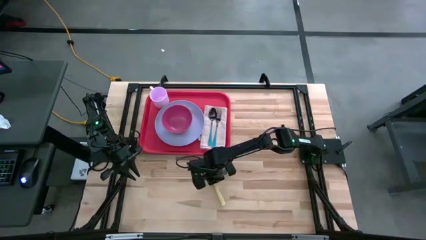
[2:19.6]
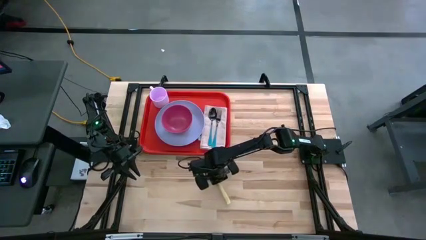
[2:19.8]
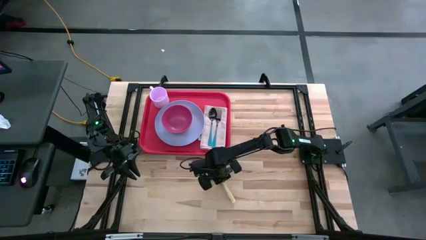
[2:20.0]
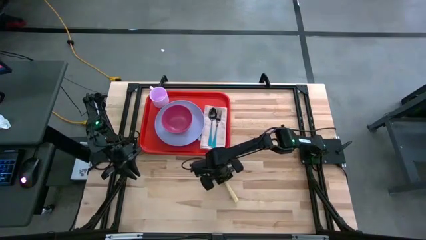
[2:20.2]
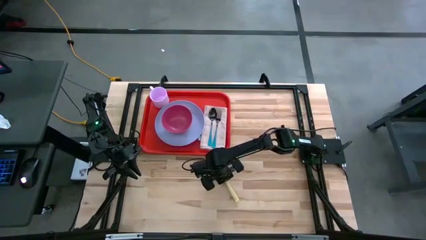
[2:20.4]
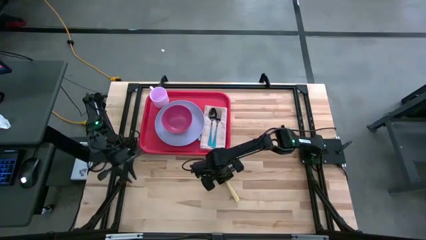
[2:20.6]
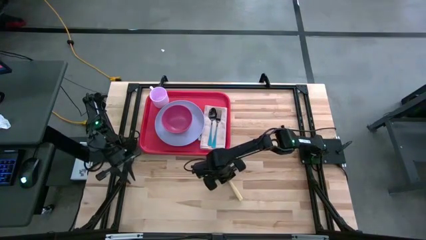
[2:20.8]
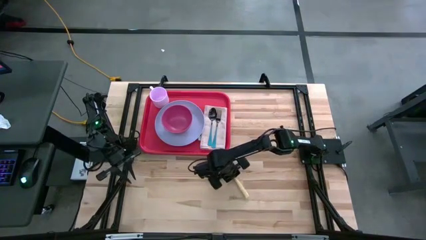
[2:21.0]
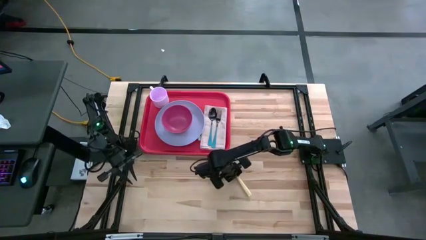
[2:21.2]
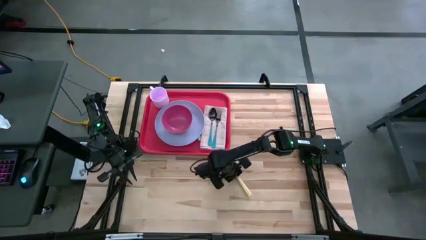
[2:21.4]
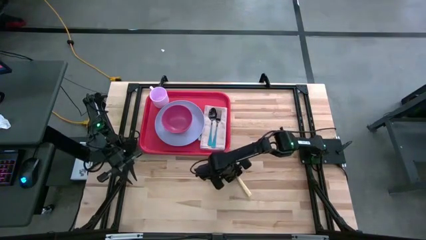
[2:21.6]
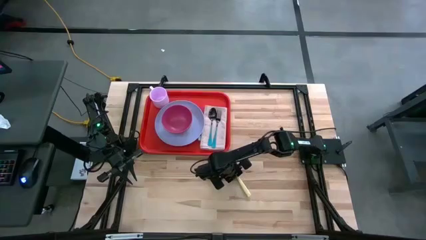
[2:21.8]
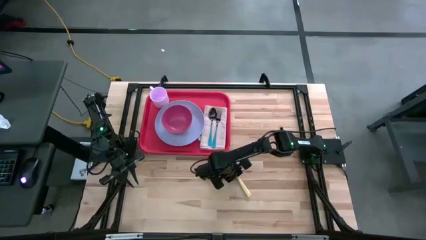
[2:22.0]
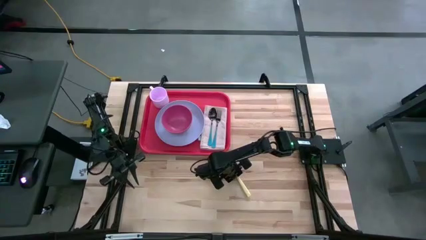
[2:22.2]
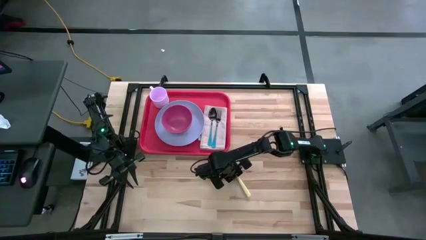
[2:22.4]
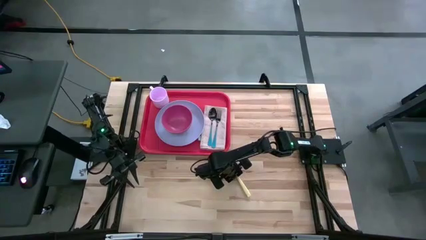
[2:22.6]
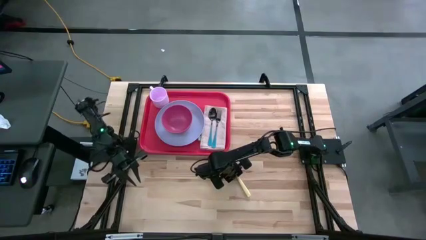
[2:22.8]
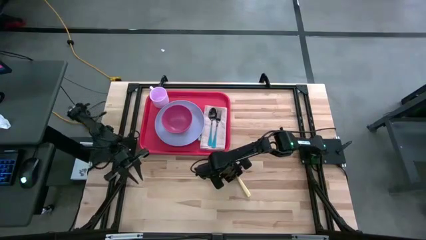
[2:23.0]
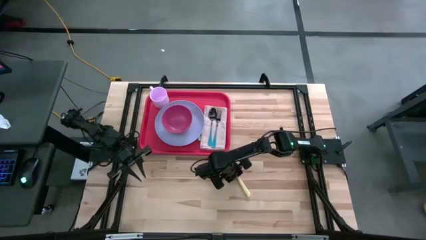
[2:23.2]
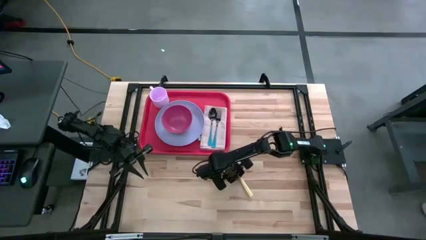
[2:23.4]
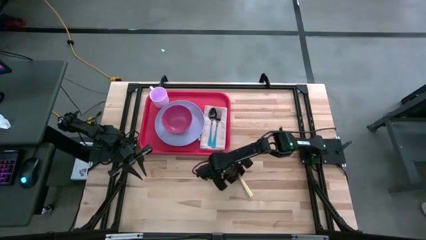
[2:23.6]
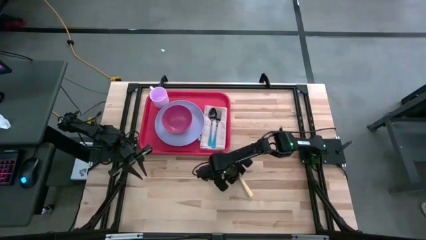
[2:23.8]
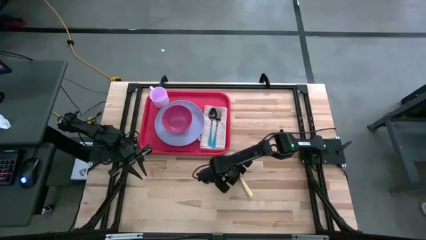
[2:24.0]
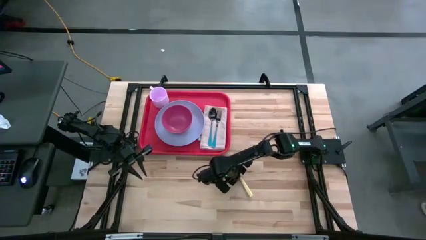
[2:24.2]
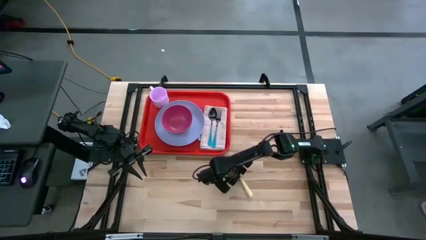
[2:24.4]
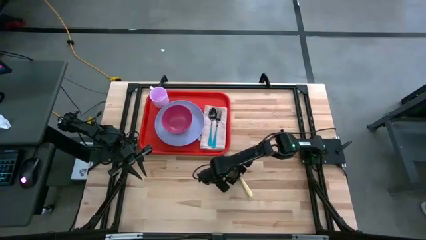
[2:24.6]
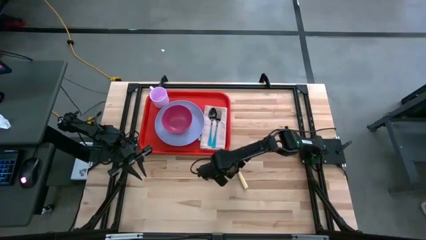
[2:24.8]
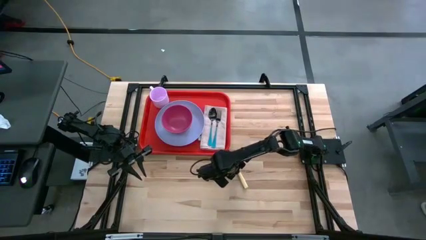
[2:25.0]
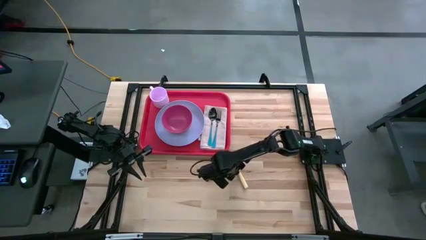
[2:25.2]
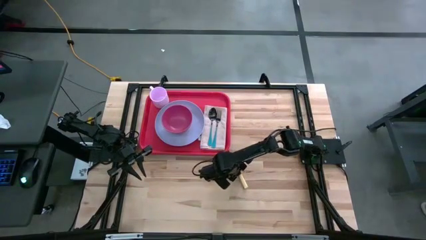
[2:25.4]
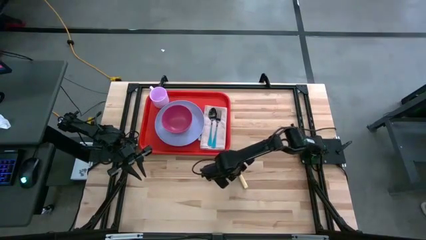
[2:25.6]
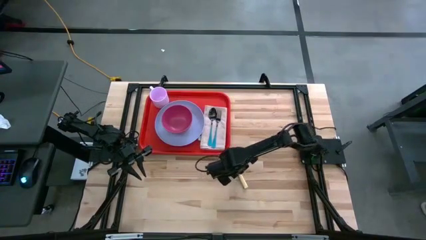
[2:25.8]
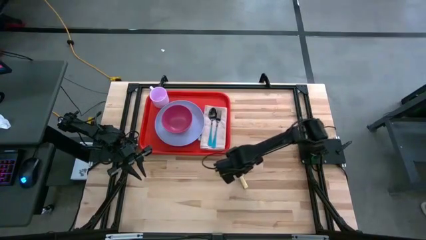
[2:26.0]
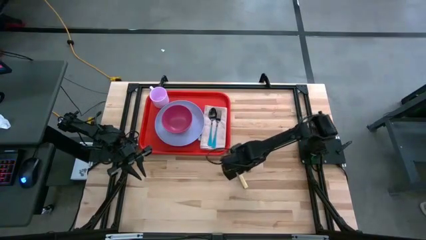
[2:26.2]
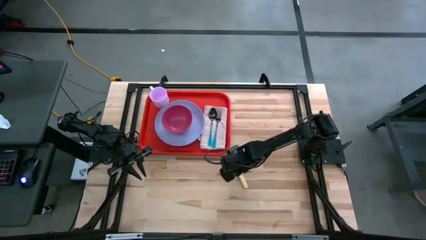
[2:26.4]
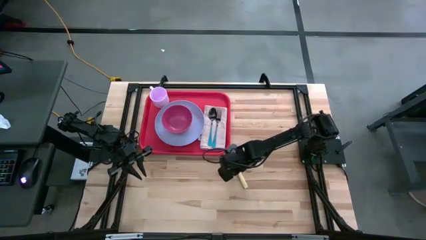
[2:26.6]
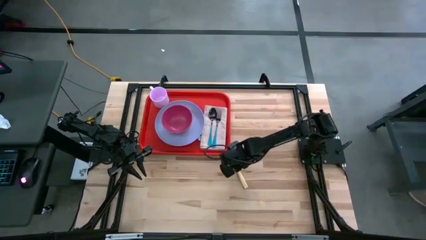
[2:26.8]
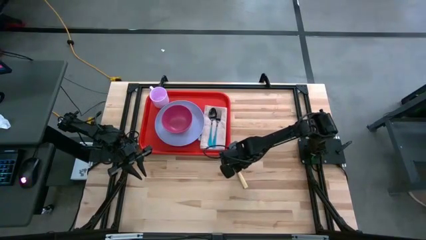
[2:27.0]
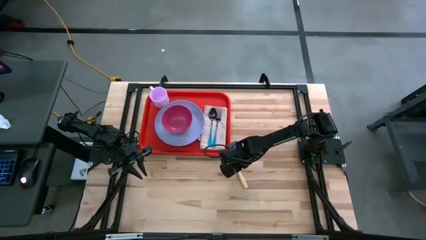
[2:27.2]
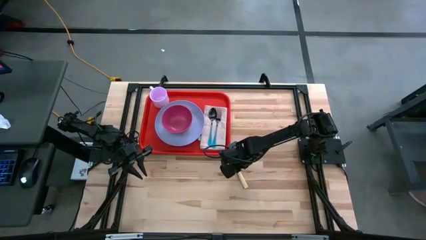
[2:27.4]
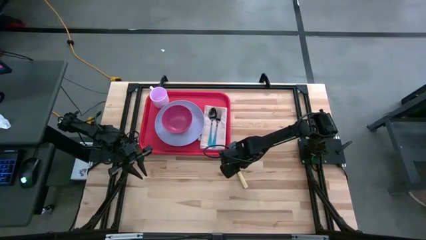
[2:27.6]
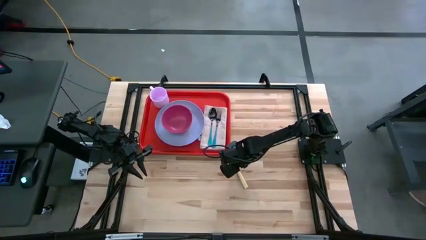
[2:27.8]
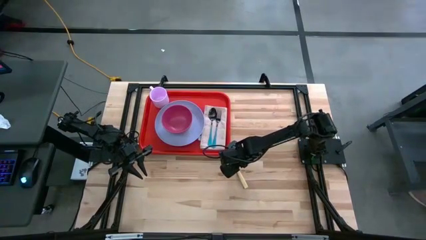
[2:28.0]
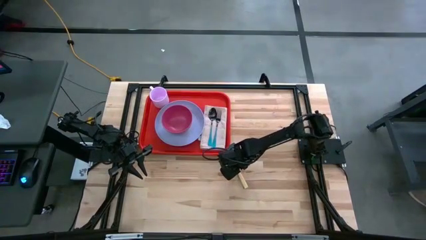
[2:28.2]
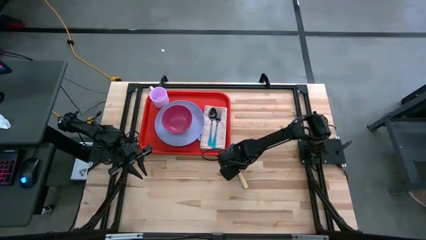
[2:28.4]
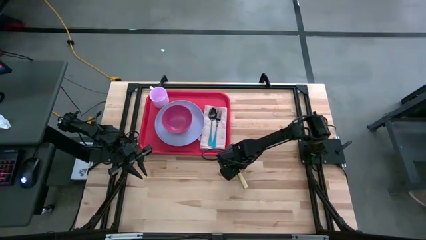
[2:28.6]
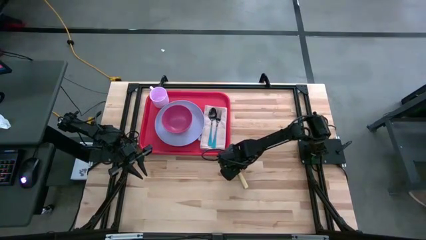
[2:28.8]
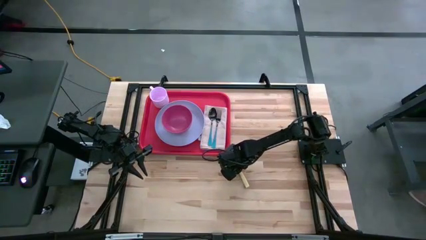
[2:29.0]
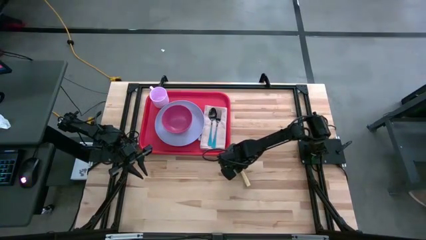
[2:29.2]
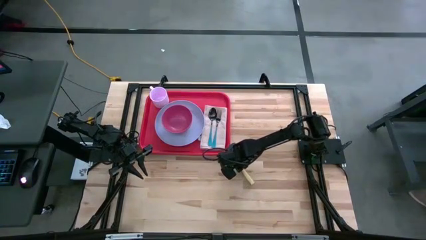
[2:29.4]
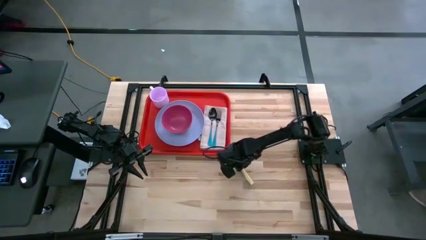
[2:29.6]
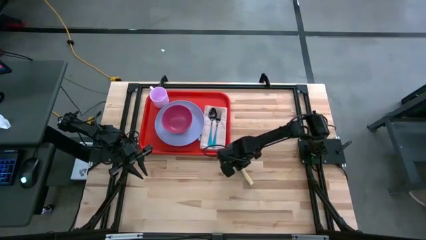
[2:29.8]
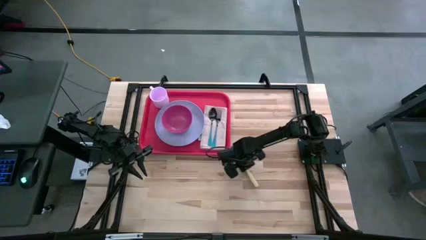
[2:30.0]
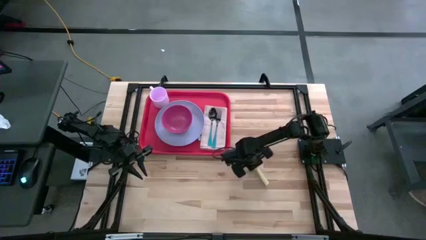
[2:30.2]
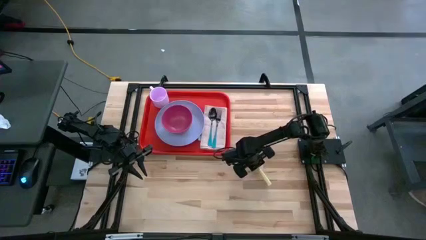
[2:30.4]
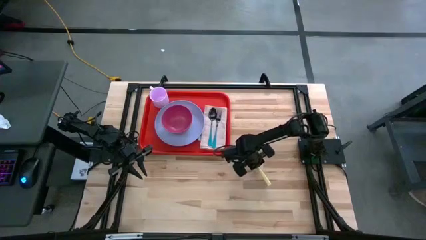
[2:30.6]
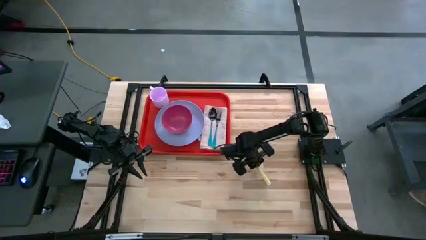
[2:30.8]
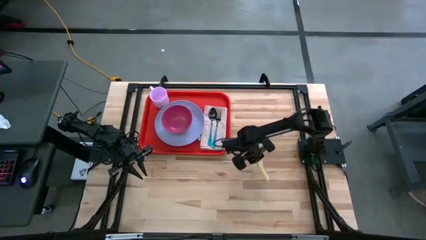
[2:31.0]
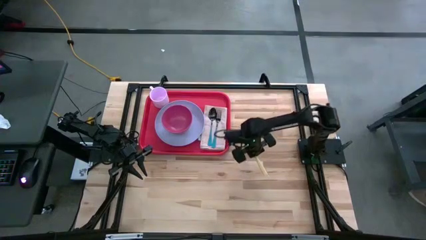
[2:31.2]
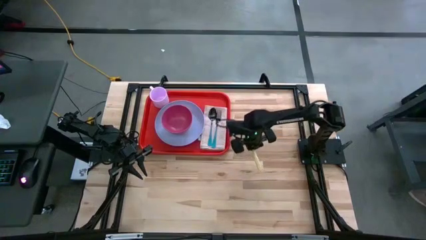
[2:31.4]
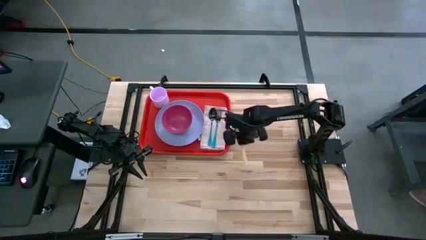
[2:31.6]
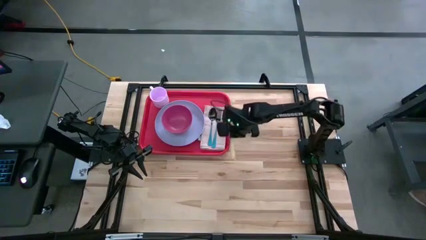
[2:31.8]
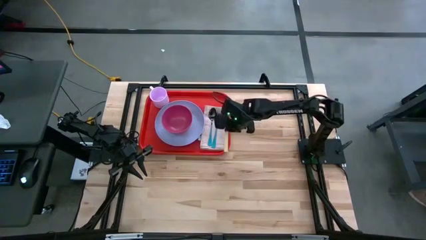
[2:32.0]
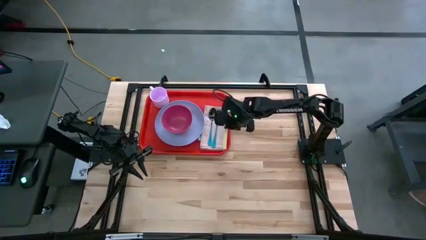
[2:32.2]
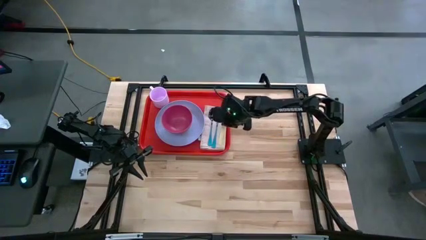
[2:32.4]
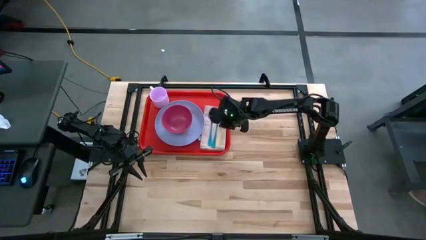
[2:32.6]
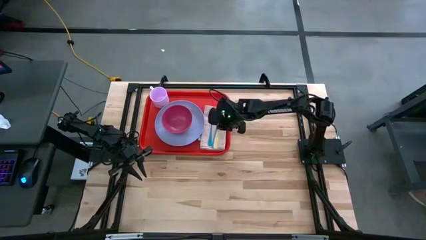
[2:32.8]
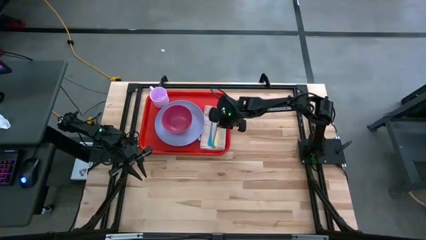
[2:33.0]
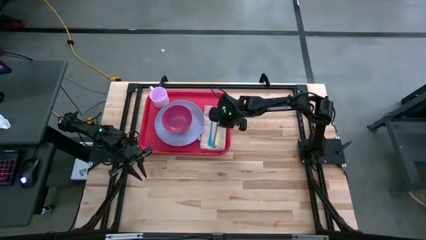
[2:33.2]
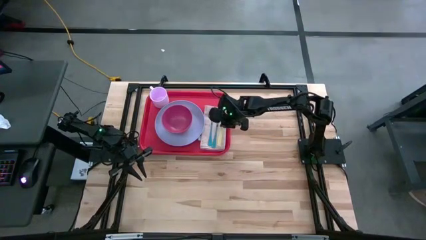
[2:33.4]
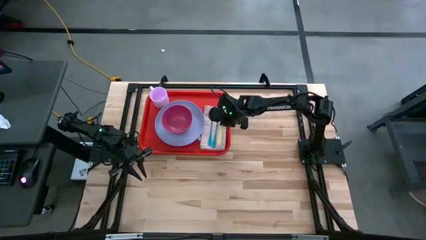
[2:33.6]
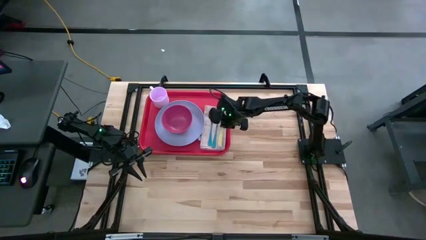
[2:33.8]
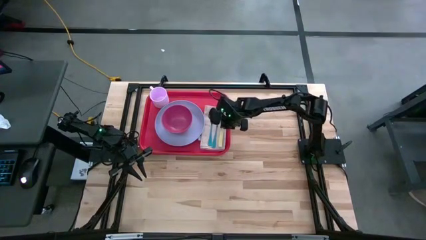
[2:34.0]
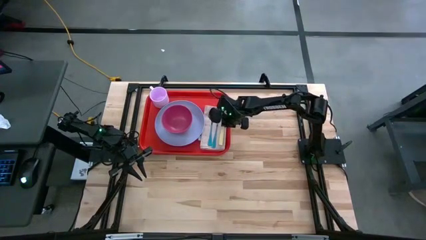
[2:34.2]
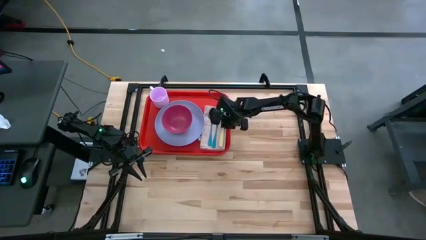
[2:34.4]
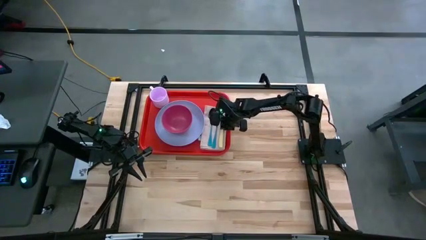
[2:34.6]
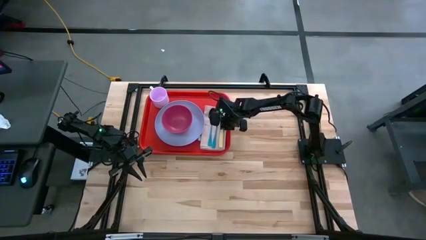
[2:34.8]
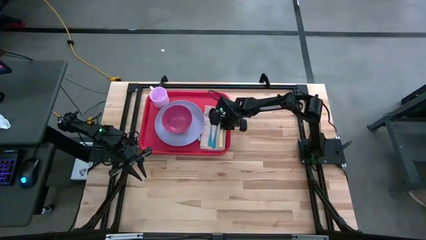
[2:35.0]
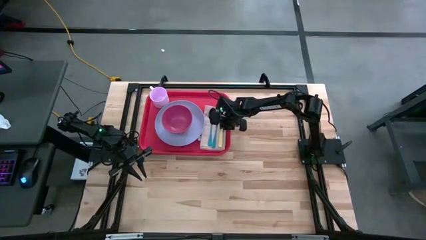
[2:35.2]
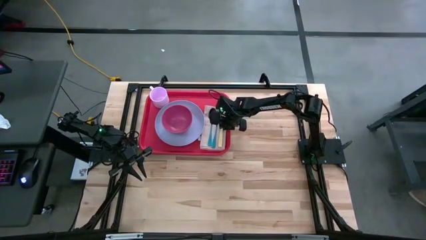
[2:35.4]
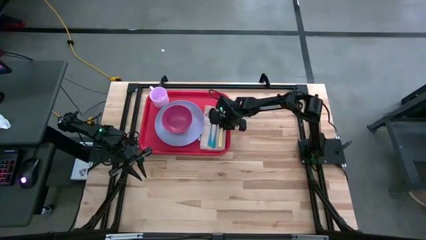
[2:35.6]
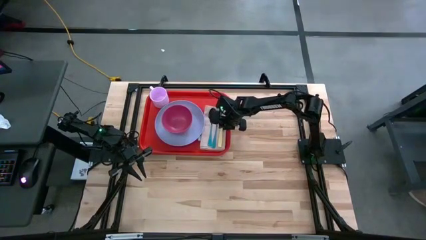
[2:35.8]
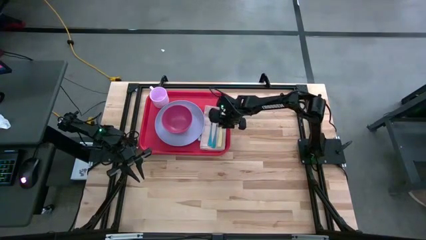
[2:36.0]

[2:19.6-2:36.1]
Task: Set up tray
Put the yellow knife on top of the brown napkin on the left side of the blue fork on the red tray
